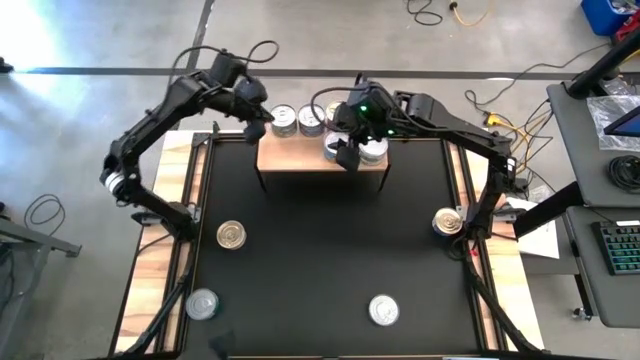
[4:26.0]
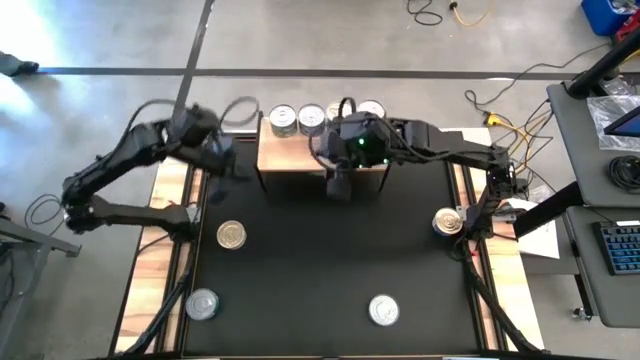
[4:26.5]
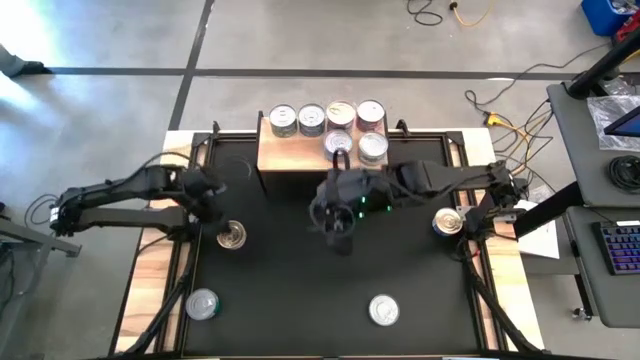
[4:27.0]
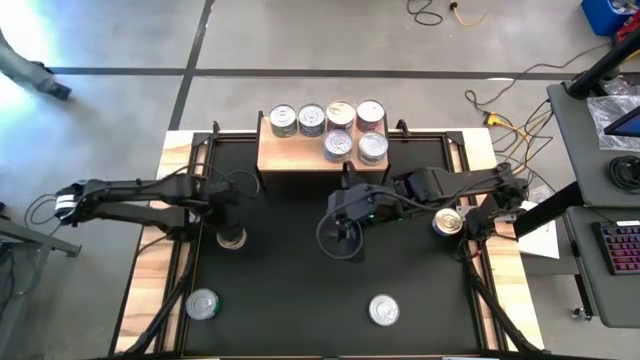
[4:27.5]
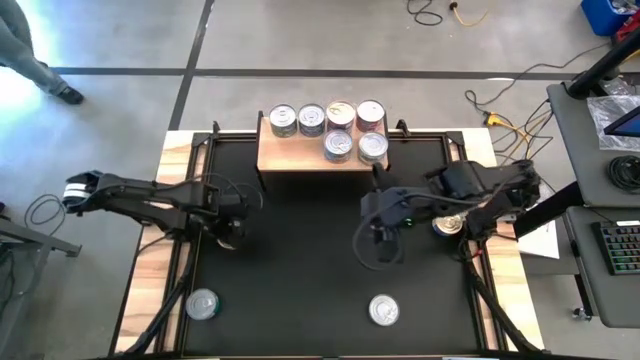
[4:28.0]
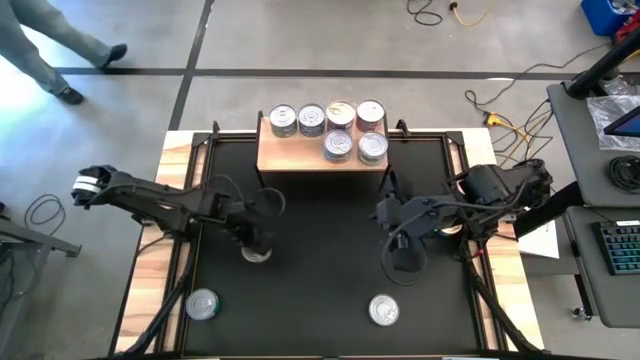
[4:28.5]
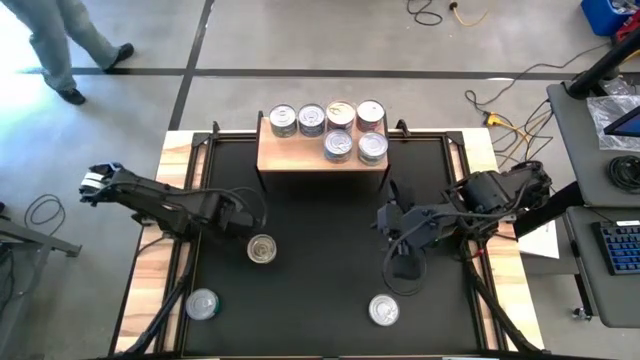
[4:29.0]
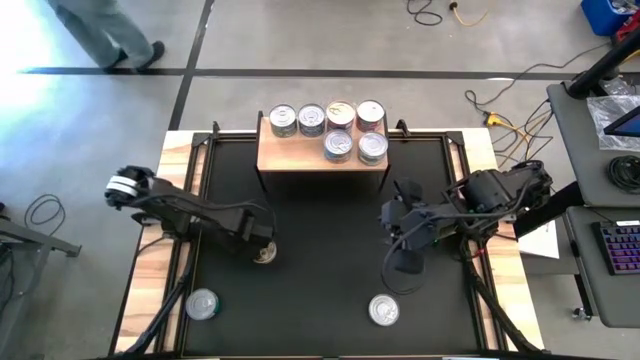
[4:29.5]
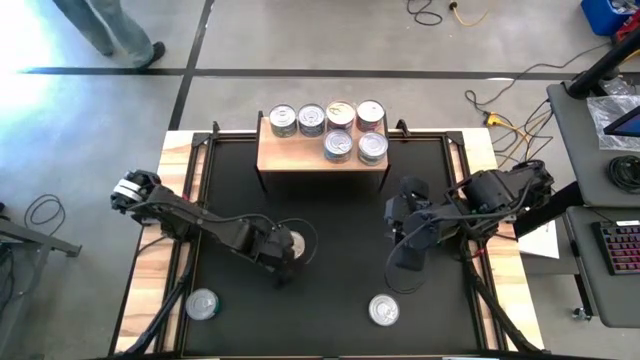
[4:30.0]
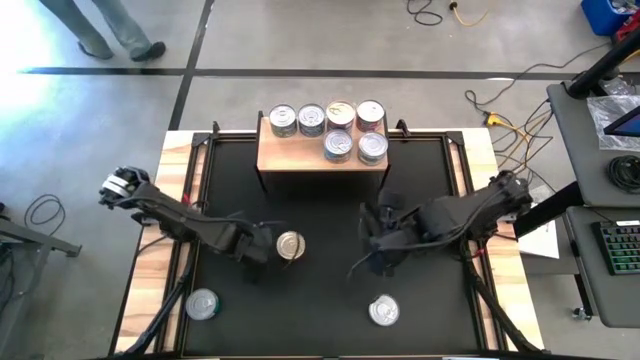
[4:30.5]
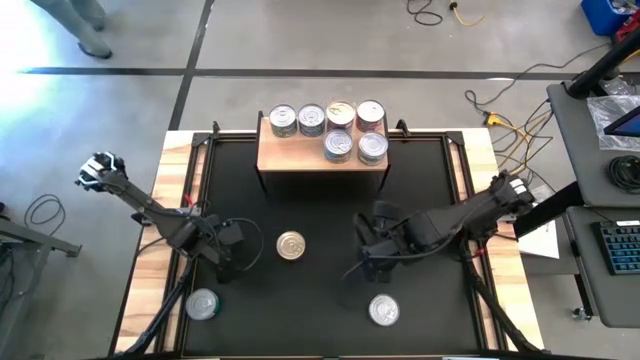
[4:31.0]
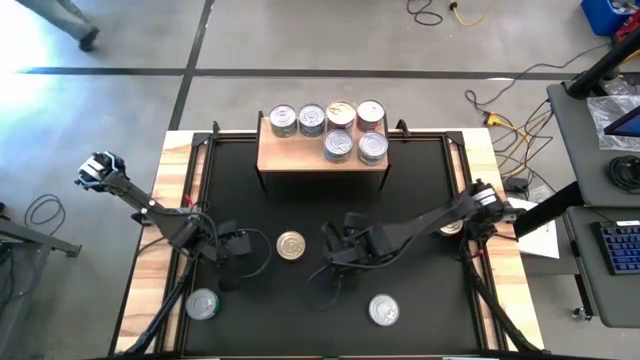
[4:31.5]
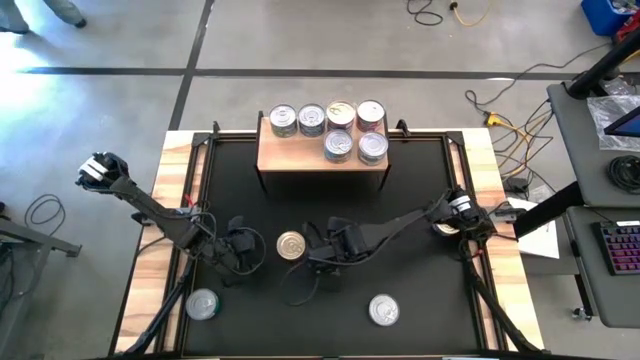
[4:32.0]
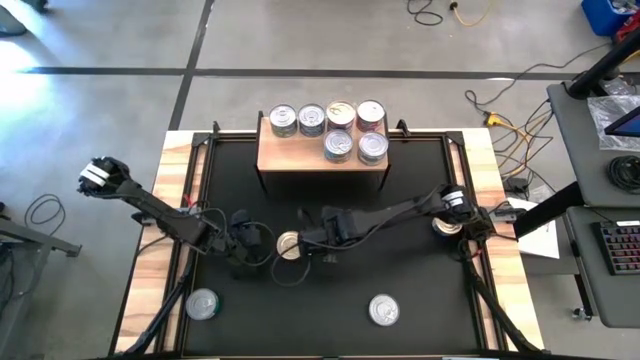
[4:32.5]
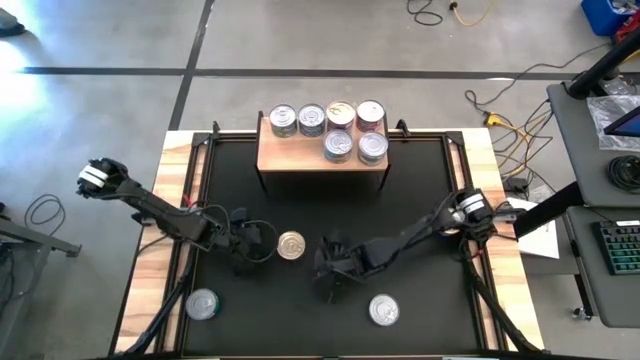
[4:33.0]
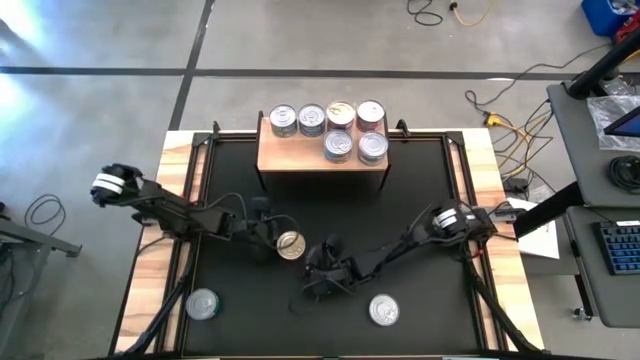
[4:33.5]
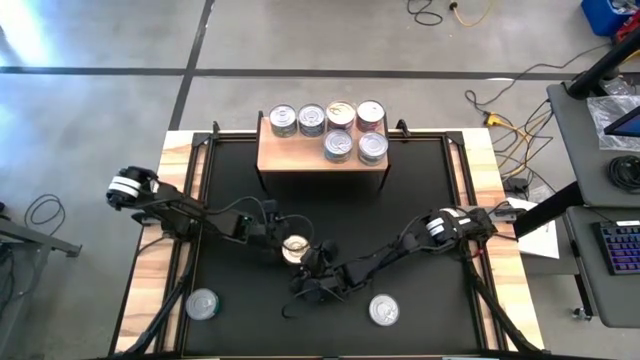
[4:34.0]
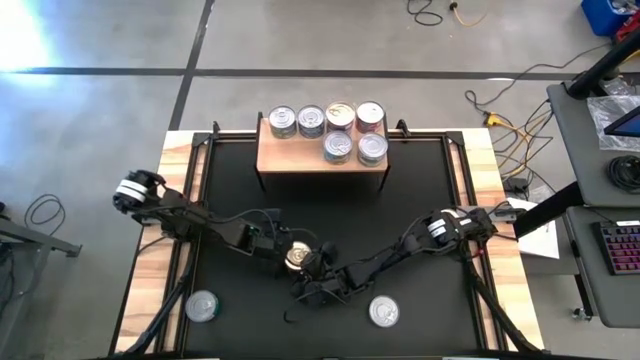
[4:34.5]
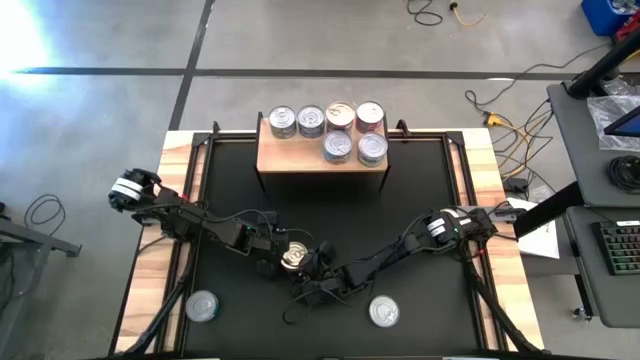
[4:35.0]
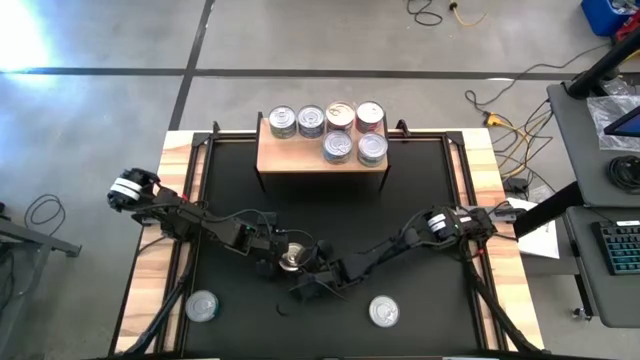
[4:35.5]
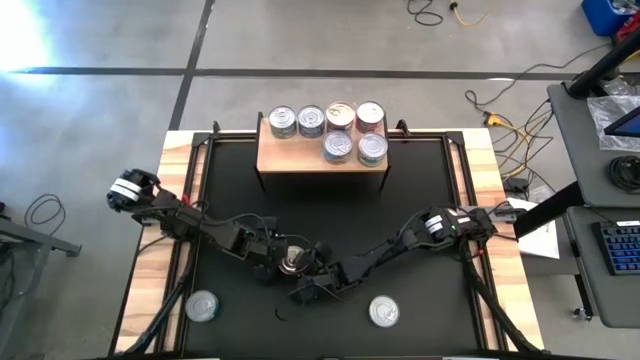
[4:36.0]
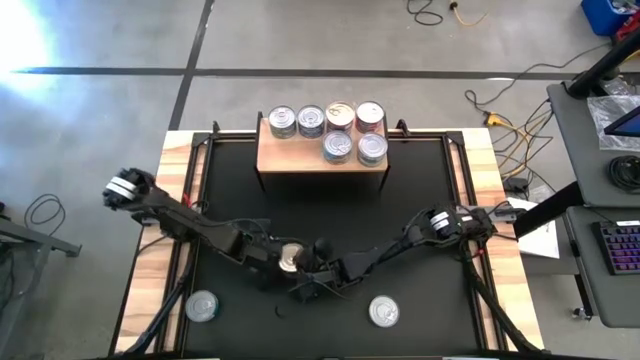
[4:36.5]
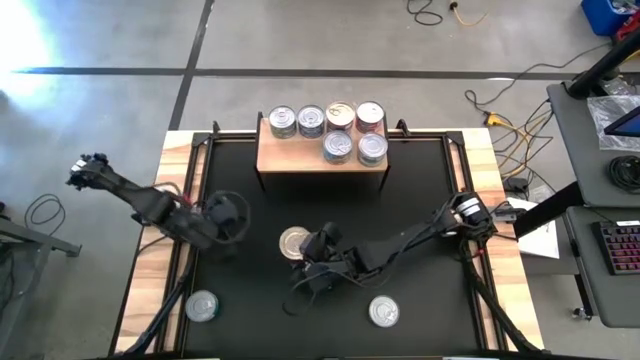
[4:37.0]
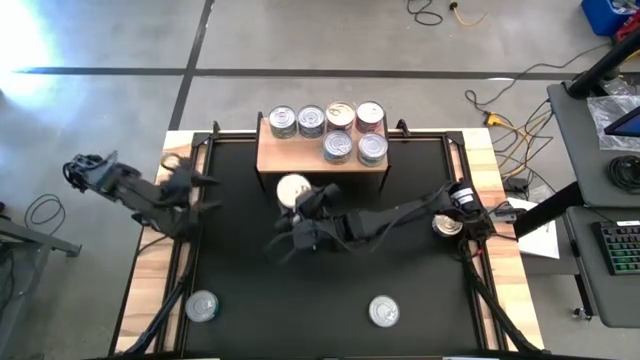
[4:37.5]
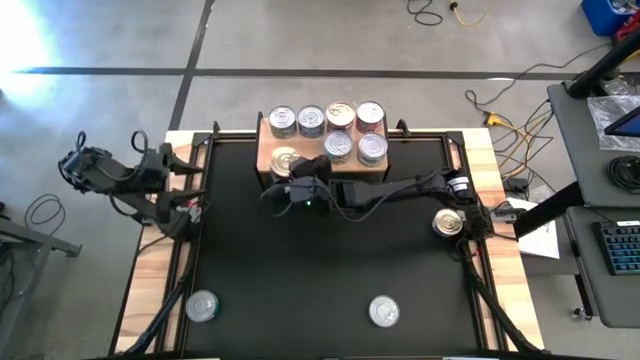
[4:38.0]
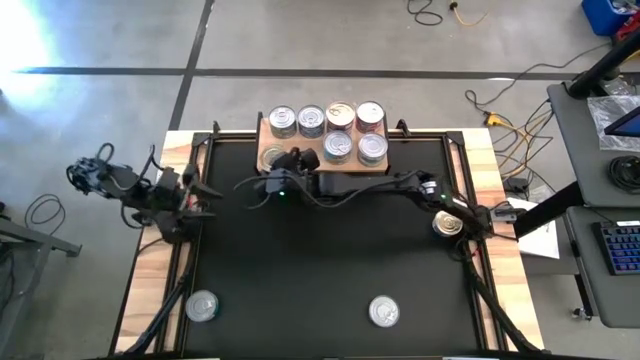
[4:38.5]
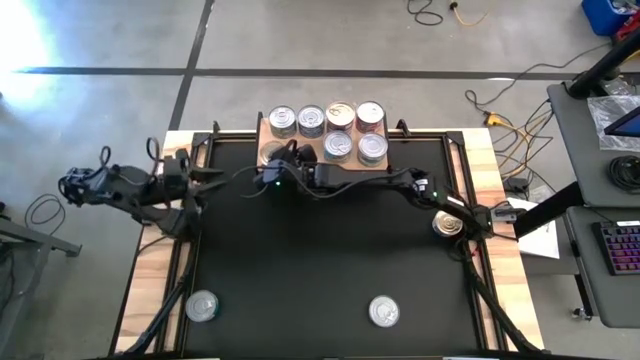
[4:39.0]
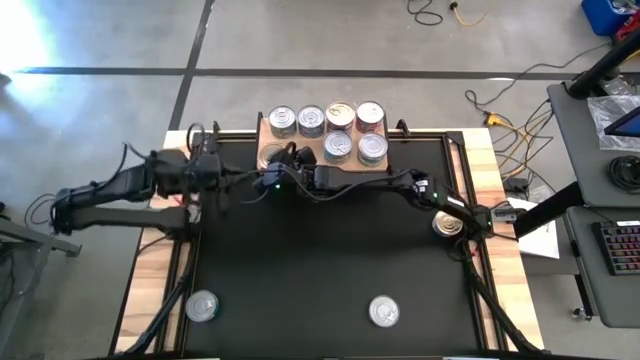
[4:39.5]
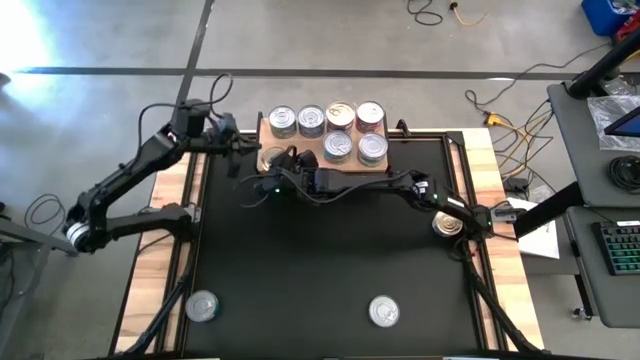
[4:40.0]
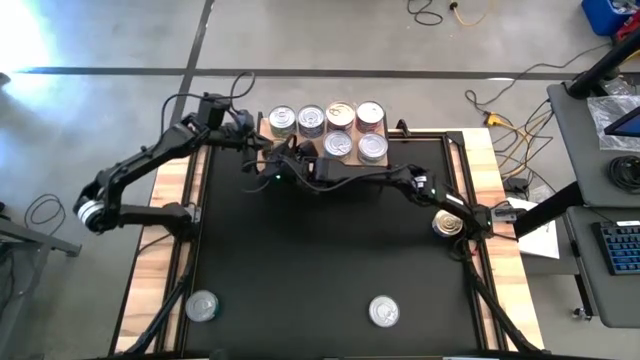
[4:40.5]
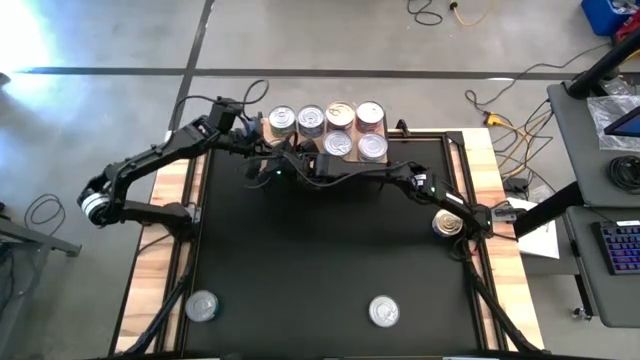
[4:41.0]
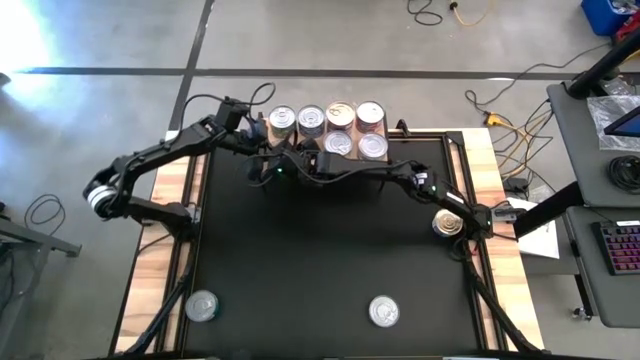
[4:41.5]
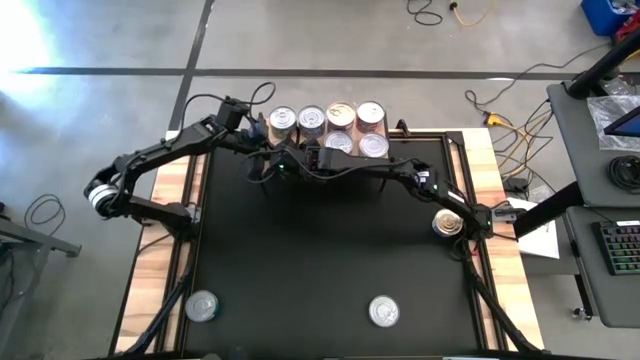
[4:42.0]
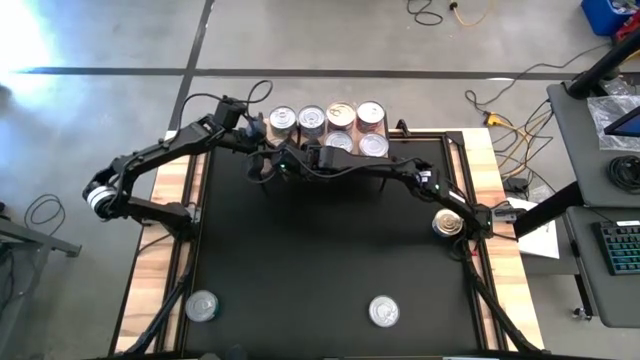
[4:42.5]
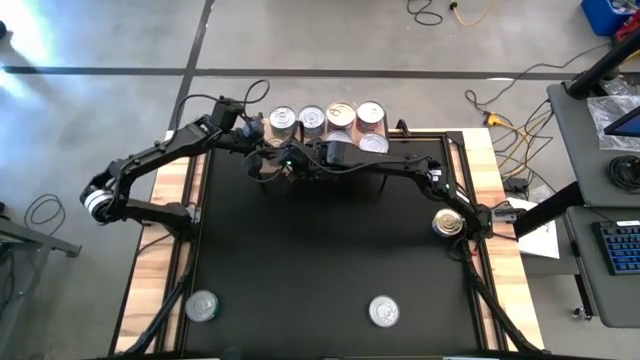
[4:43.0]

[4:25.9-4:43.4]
Task: Stack canned seafood by type on shelf
Put the blue-pink tuna can on the shelf

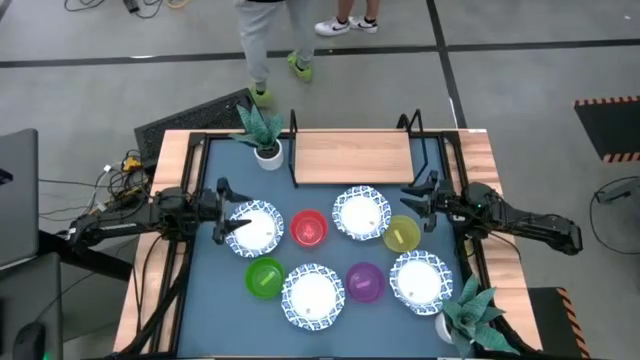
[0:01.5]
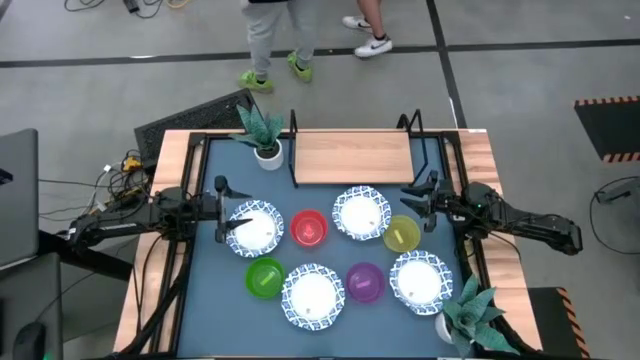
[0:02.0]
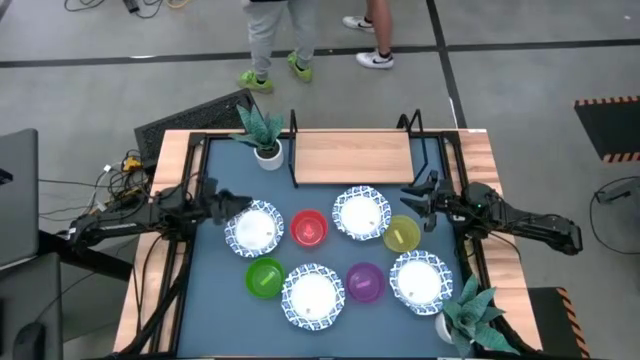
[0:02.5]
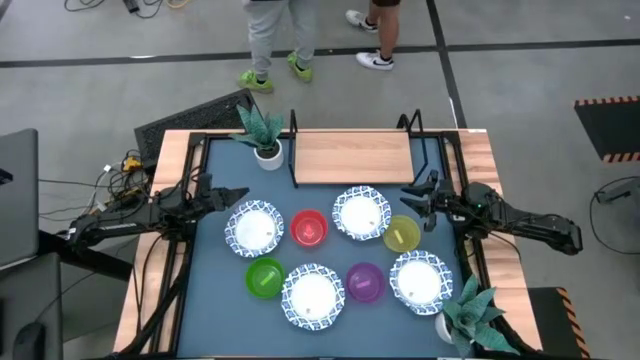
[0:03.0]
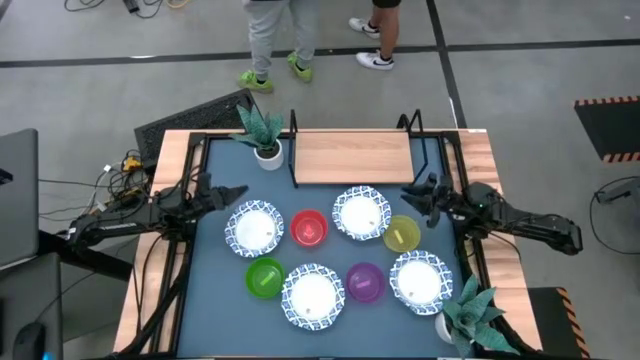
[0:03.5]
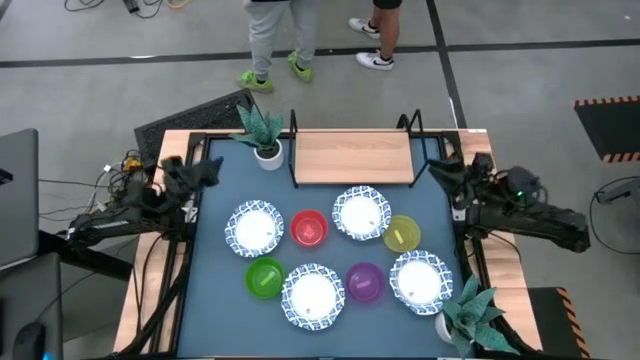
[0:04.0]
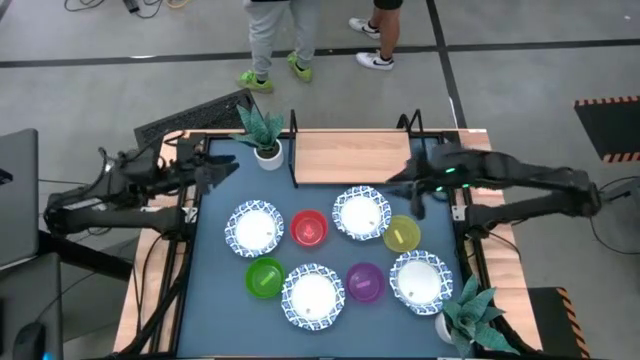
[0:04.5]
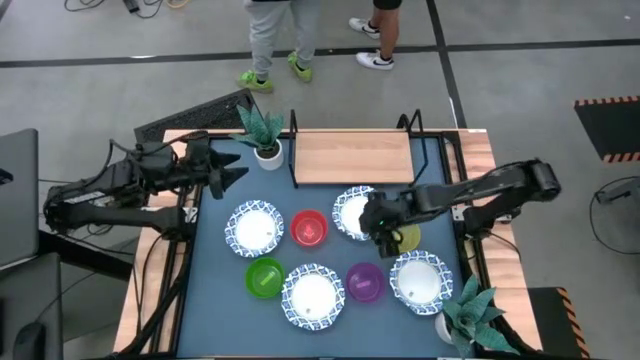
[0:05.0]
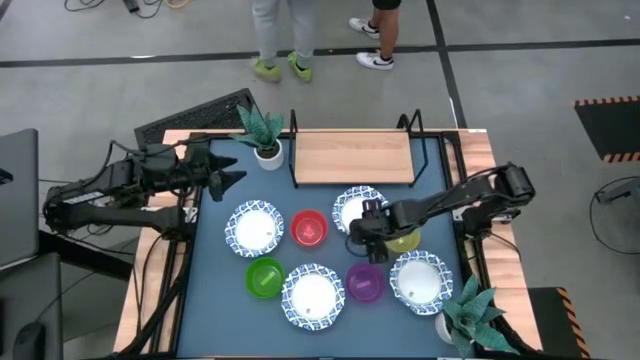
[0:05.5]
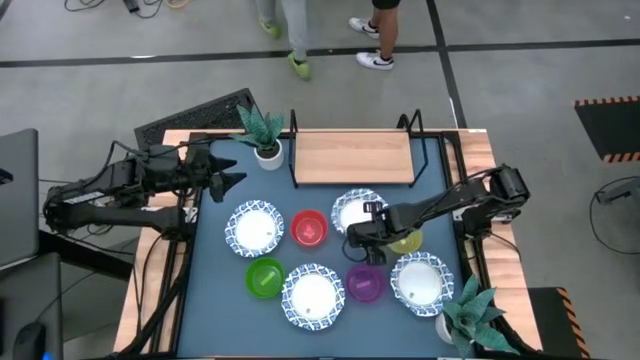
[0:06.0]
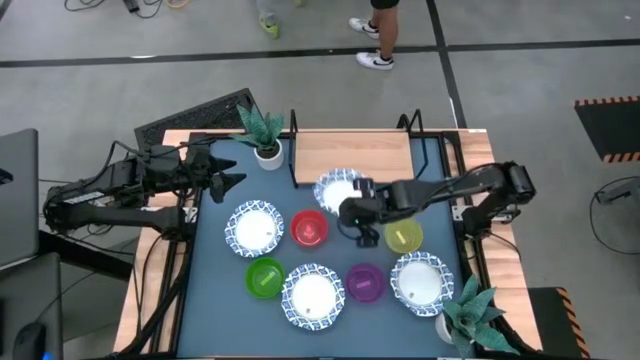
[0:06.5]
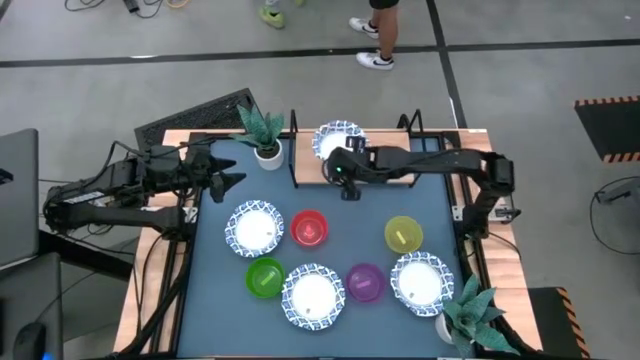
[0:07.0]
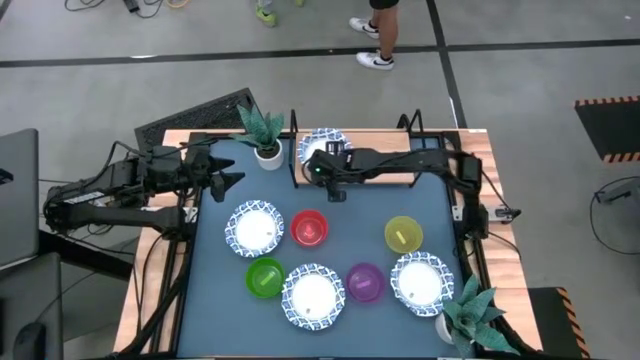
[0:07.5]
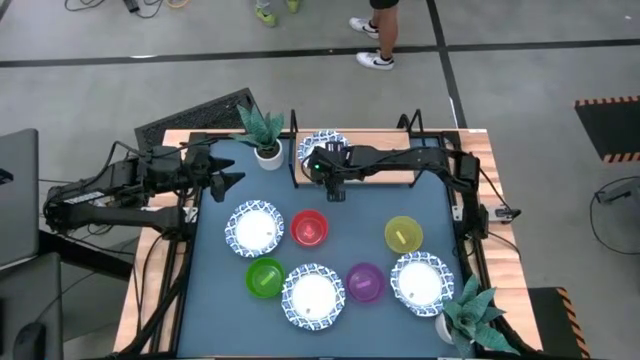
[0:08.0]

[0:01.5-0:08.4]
Task: Place and stack bowls onto a shelf
Put the white patterned bowl on the shelf
